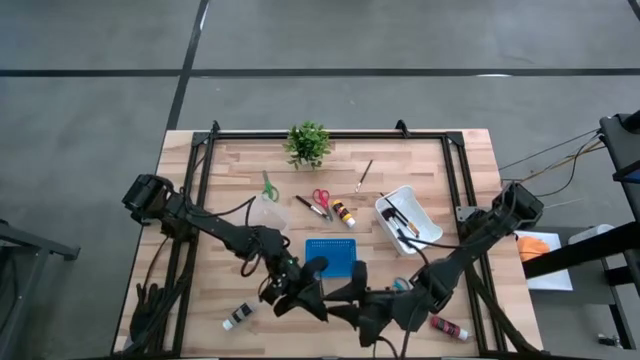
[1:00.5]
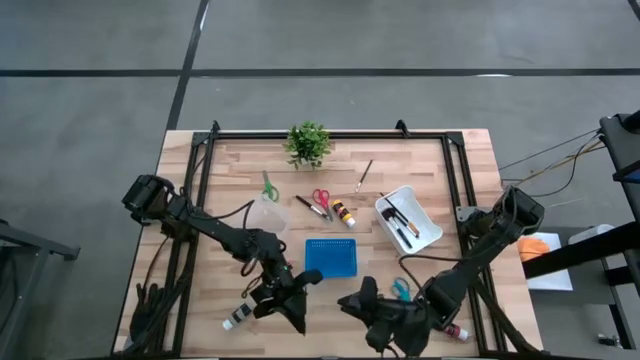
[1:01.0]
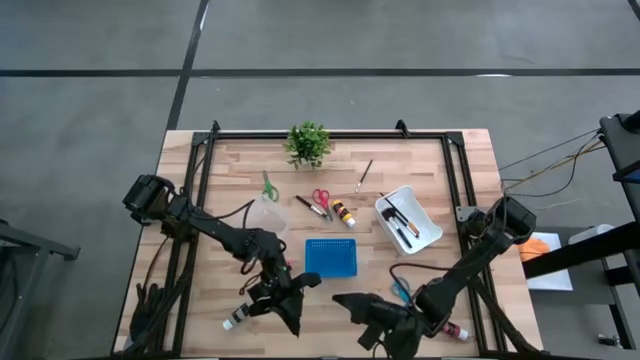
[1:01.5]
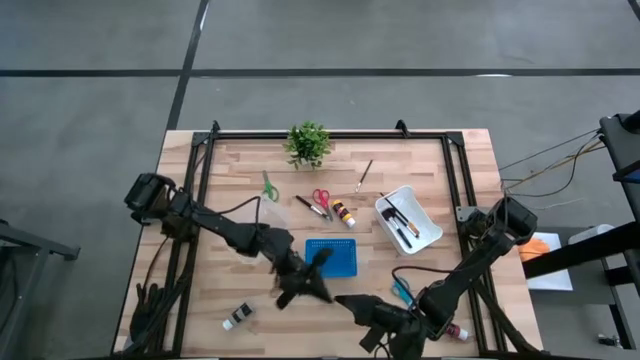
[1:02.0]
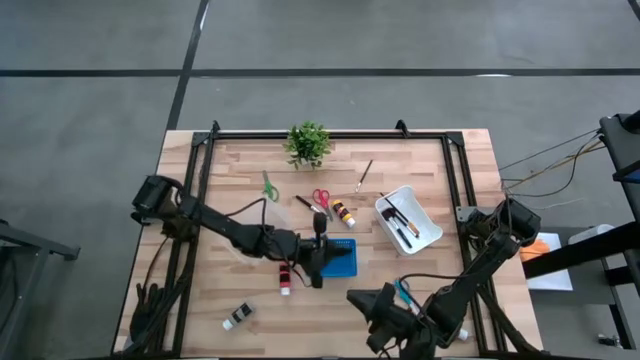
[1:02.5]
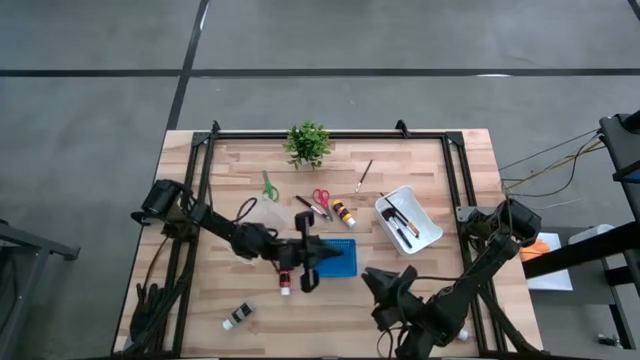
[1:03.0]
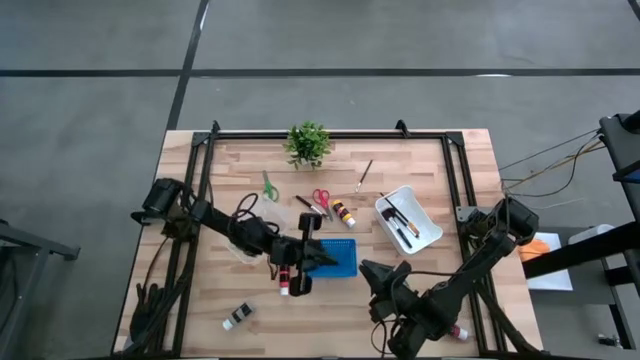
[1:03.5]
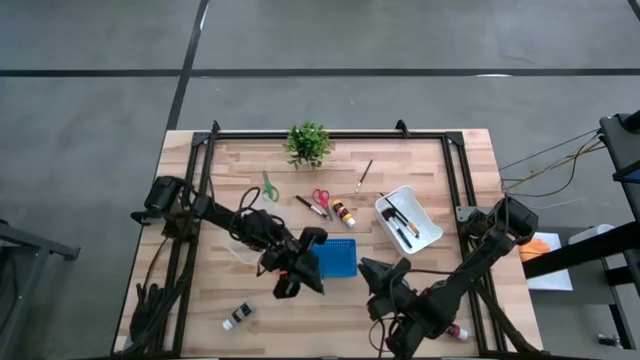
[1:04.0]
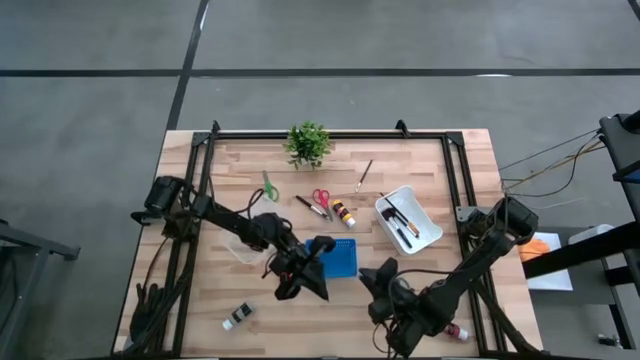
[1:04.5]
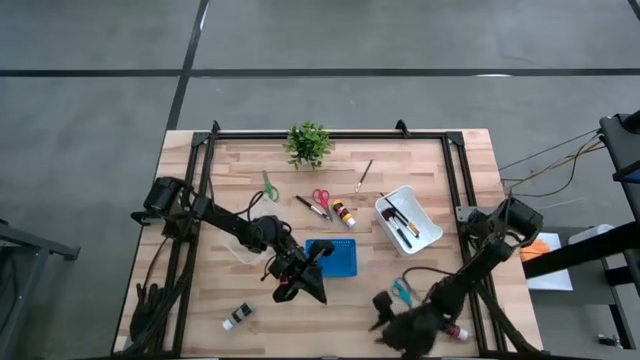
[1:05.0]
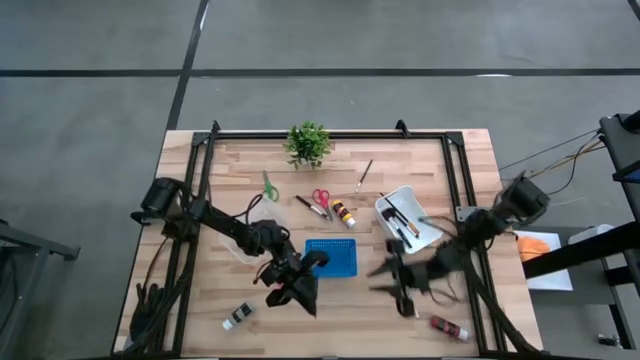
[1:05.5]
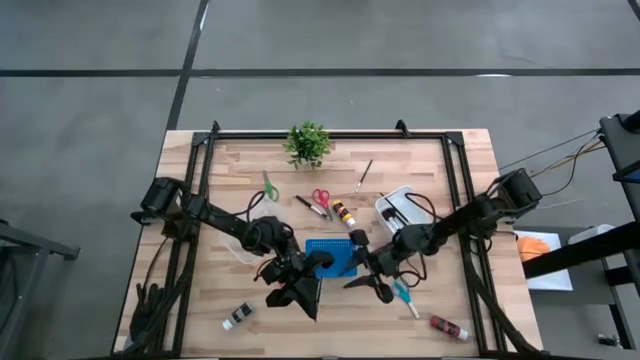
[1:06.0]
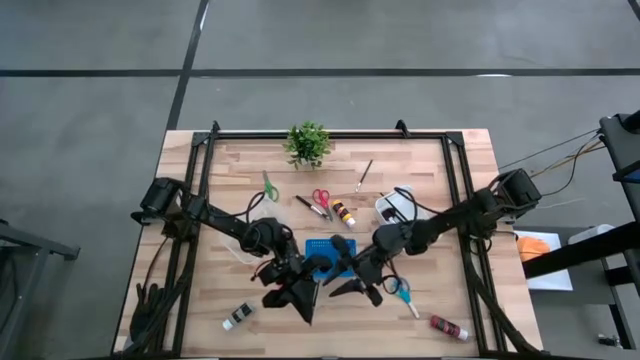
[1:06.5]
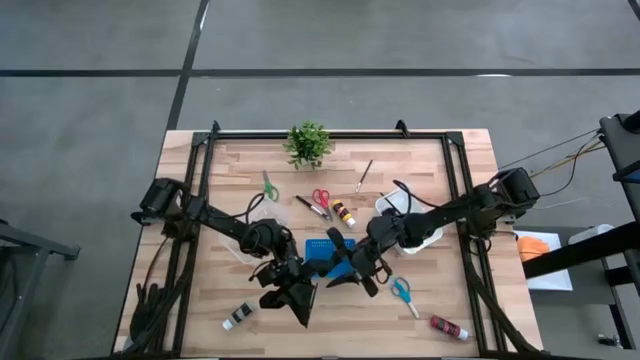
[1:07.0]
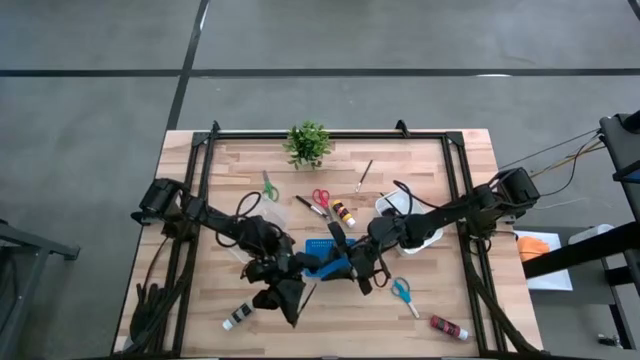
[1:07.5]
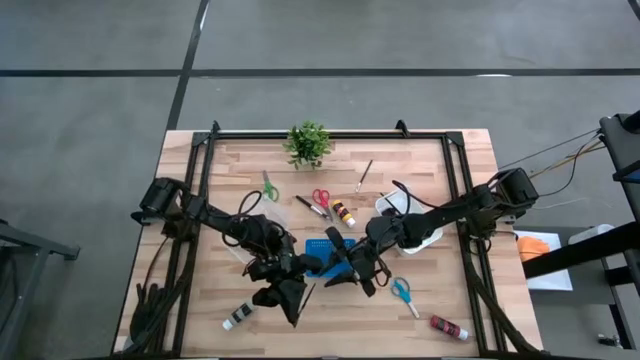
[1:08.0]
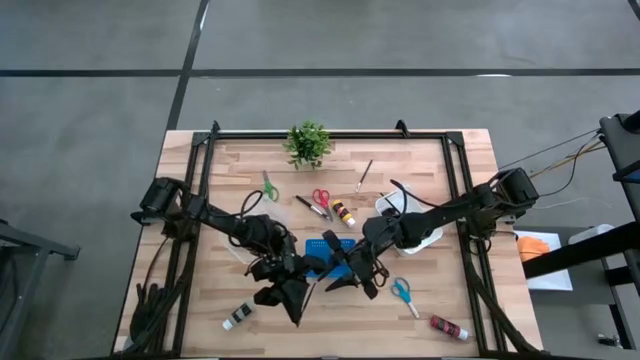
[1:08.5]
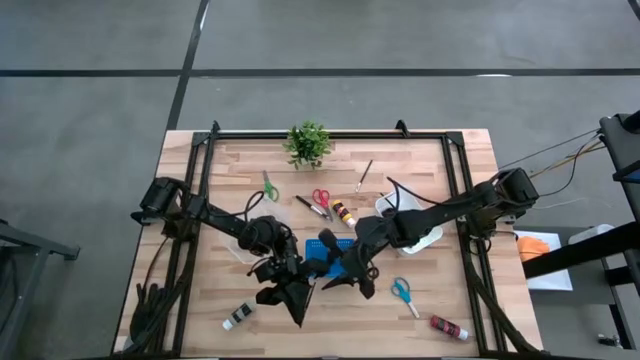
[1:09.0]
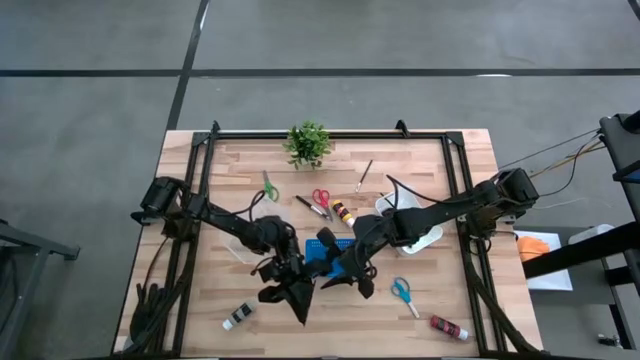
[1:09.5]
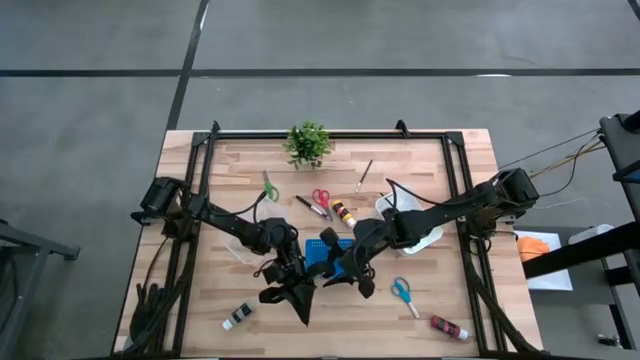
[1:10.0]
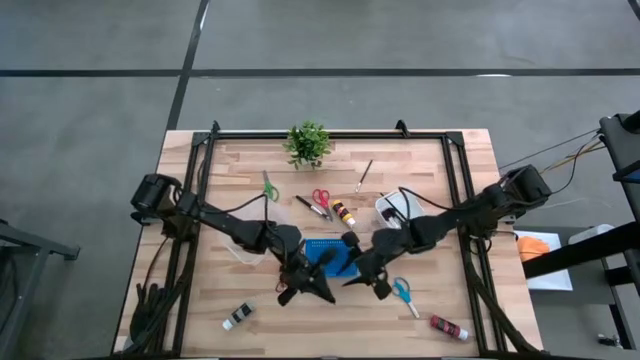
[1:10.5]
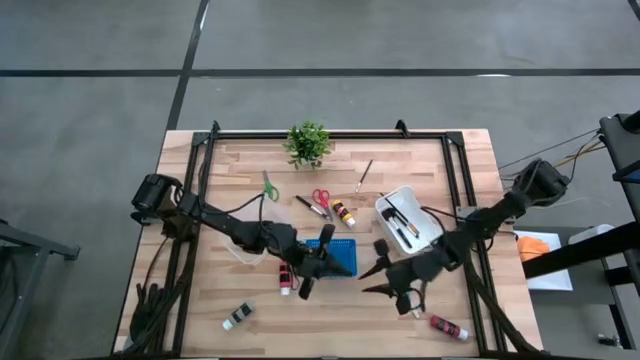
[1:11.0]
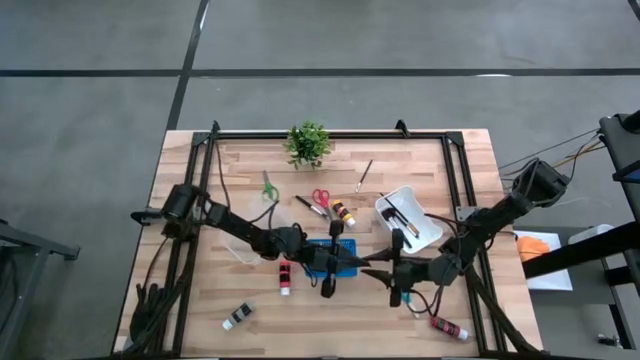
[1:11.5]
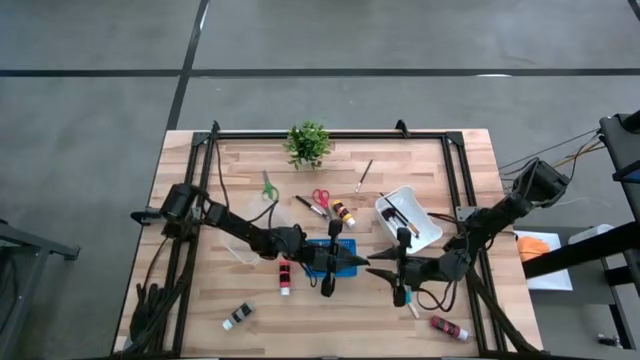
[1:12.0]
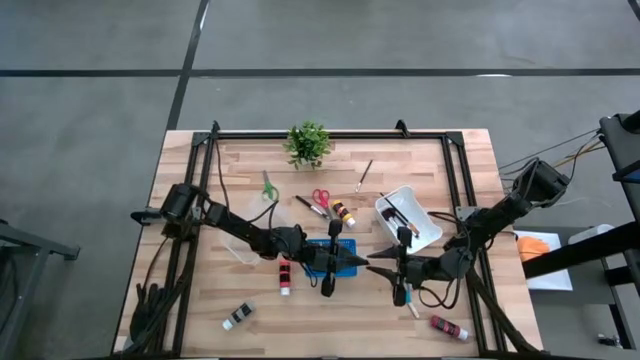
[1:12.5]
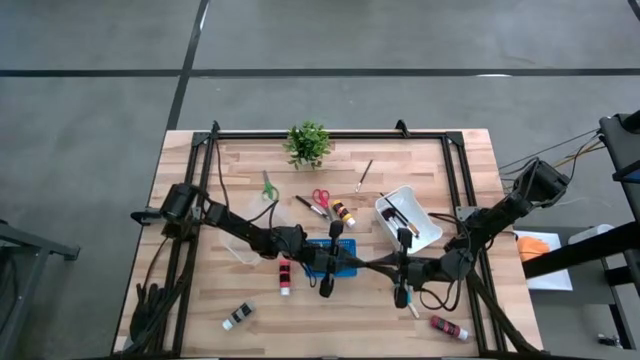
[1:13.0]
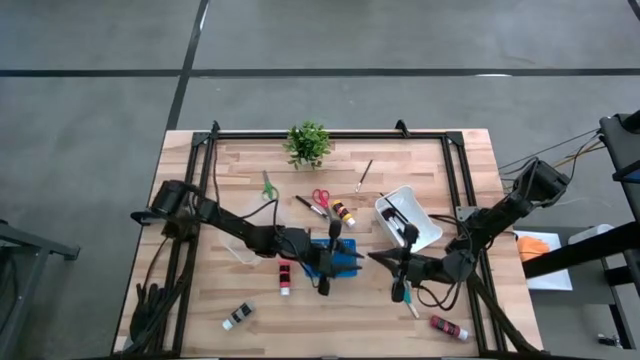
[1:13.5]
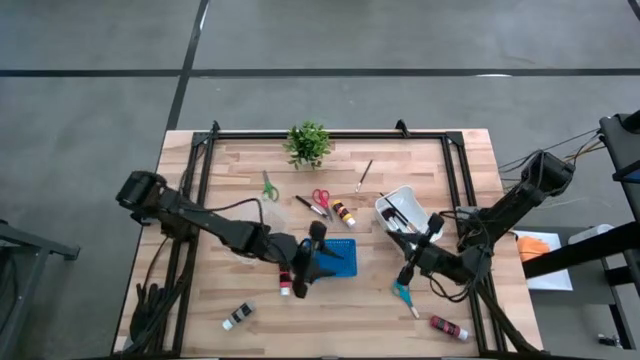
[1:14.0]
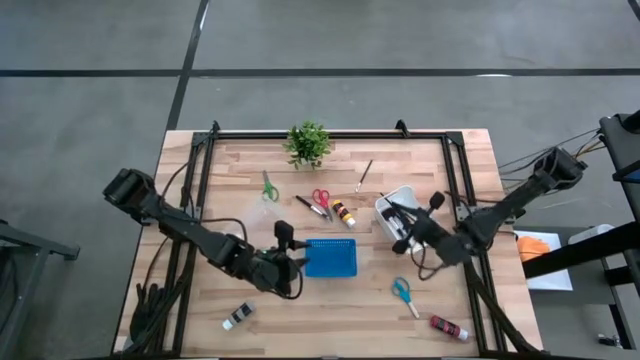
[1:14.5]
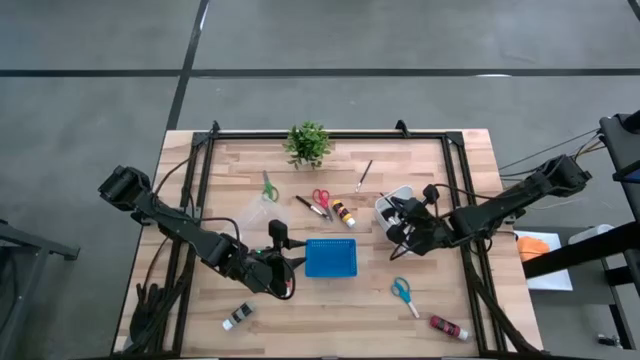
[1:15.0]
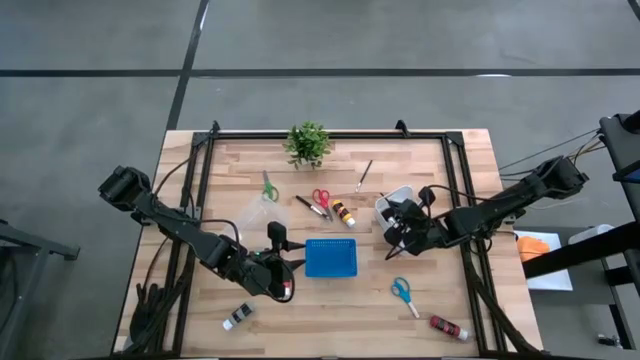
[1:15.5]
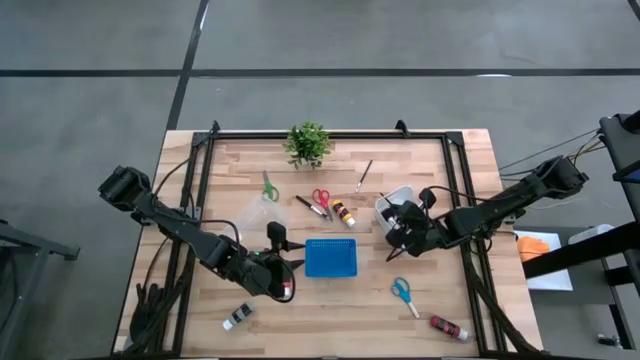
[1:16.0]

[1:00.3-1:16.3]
Task: Pick & Place Paint Supplies
Put the eyelash brush in the white bin

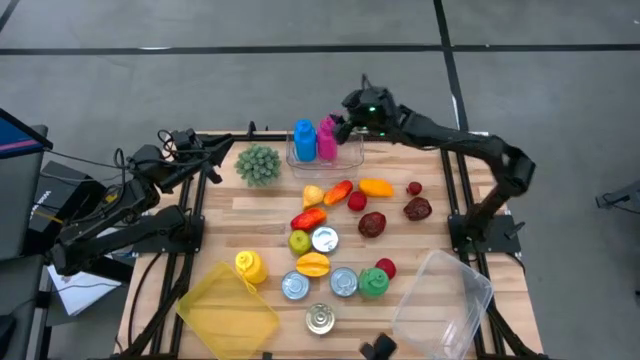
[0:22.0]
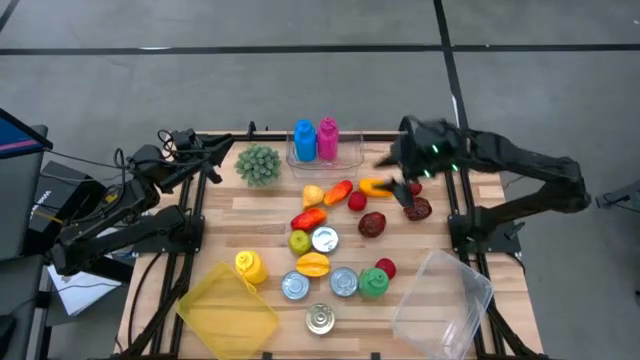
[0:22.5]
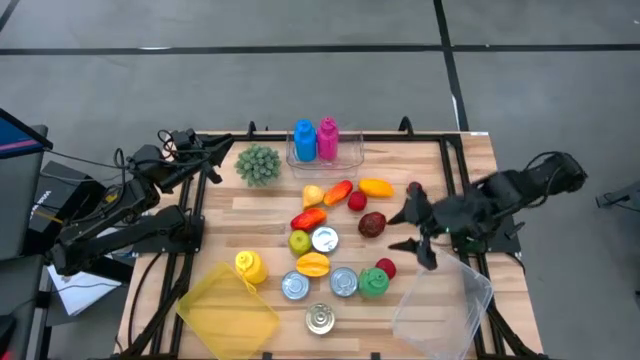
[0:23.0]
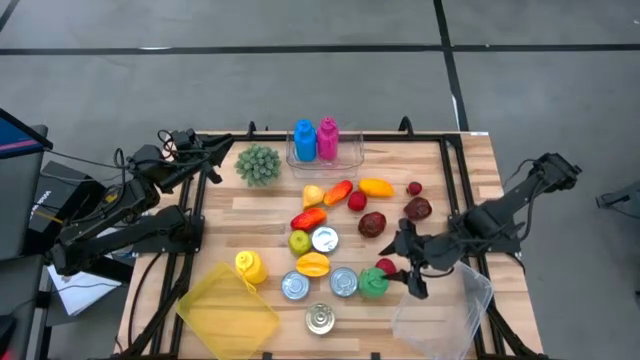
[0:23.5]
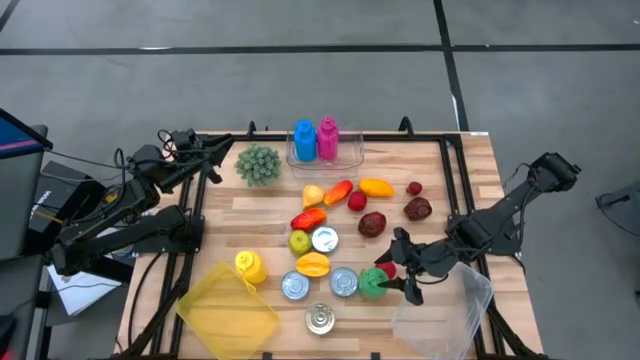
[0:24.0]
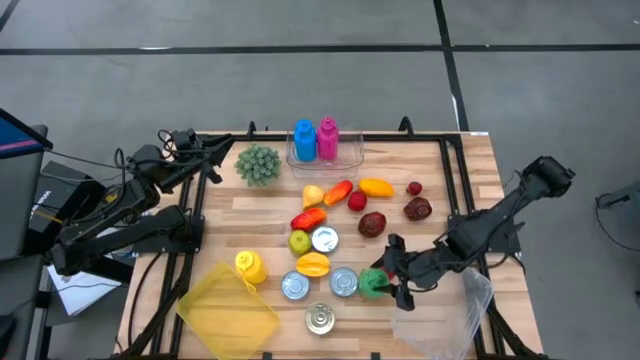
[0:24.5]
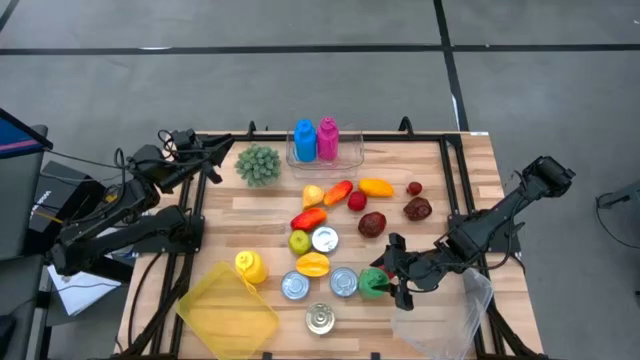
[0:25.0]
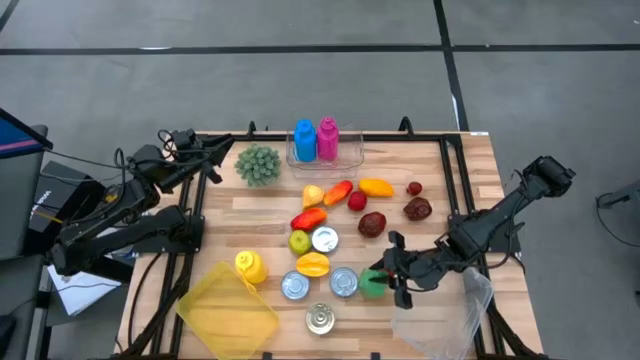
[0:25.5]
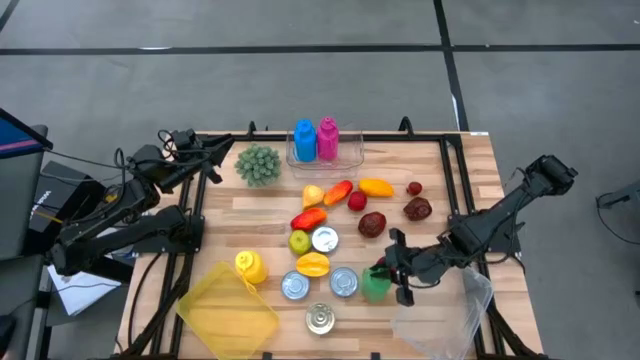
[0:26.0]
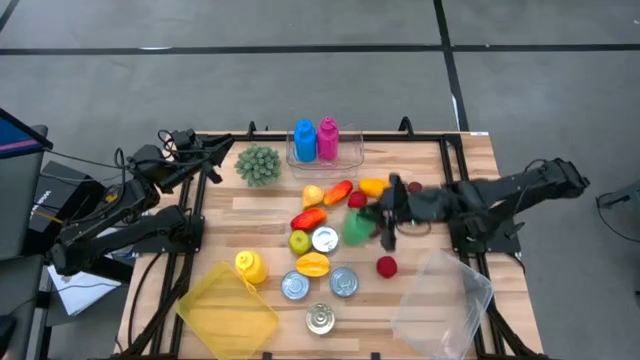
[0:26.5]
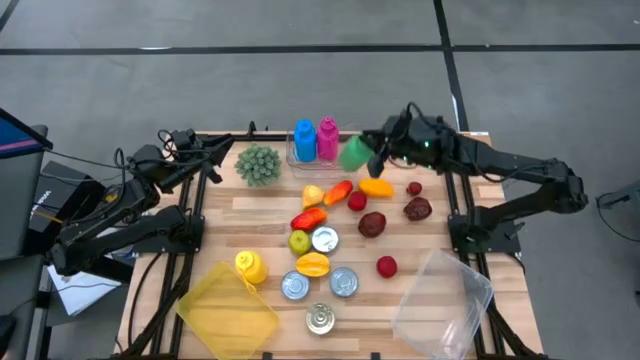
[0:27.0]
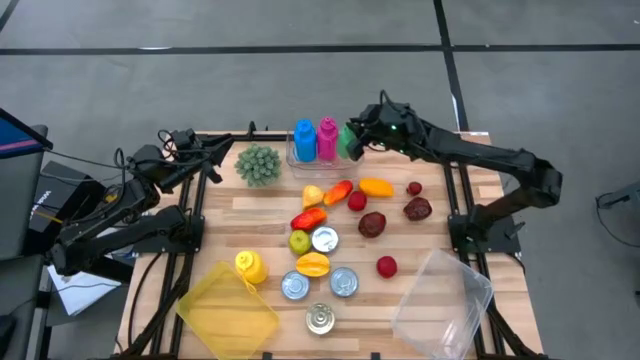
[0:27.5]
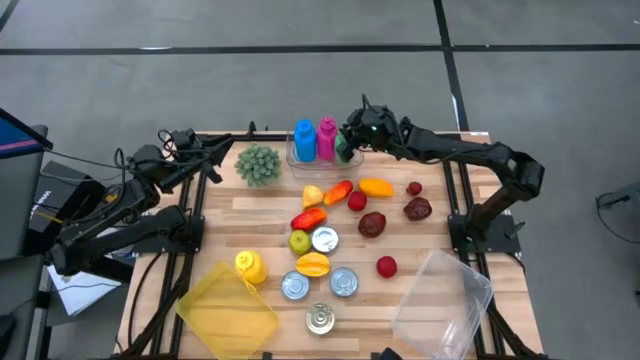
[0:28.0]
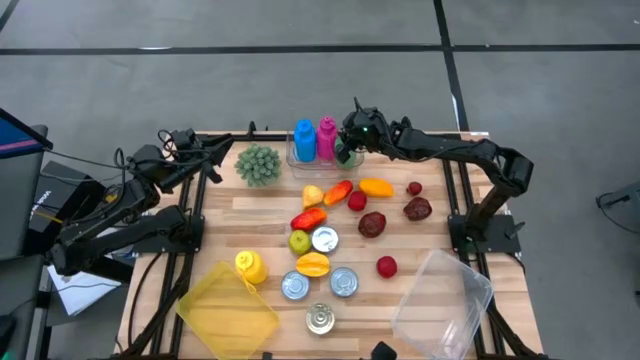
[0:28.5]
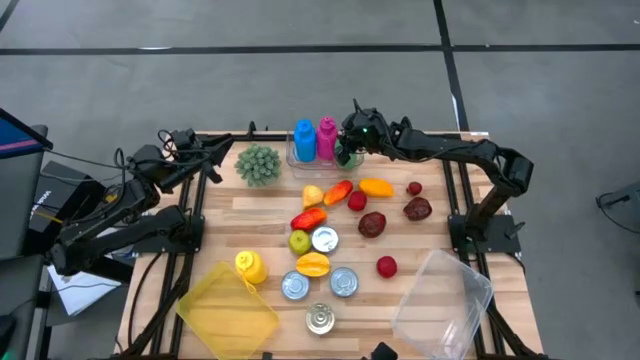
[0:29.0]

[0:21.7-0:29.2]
Task: Pick & Place Food Item
Put the green water bottle into the transparent bin
